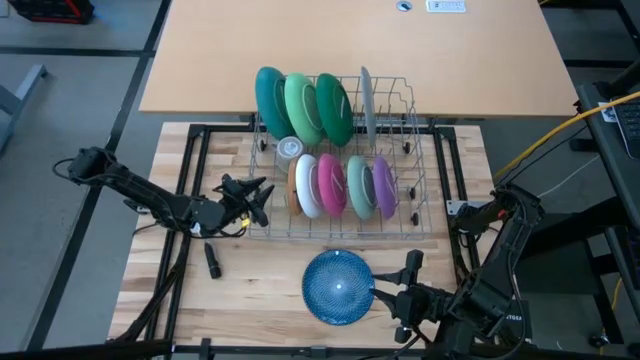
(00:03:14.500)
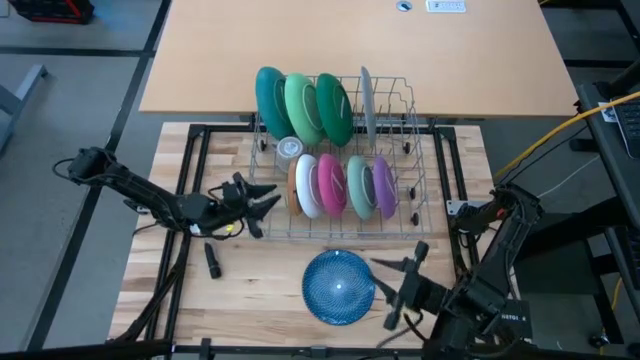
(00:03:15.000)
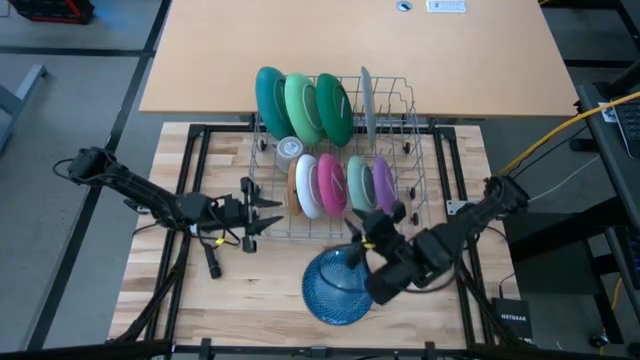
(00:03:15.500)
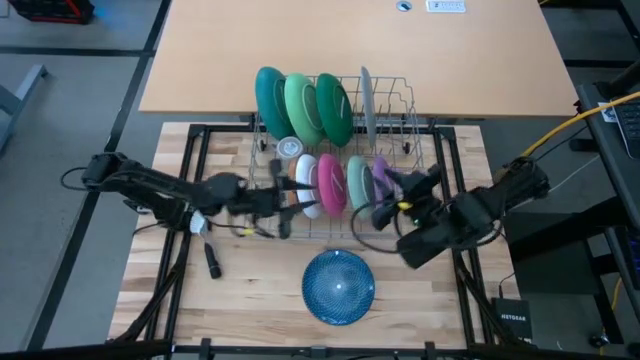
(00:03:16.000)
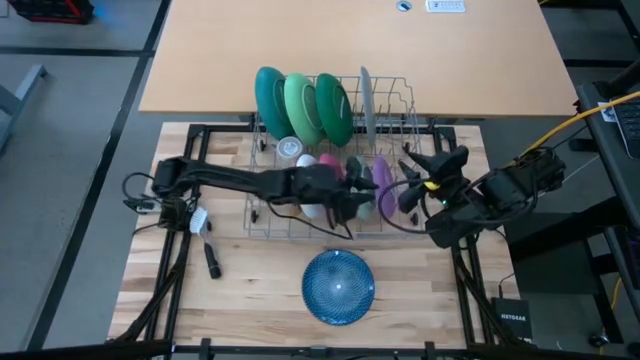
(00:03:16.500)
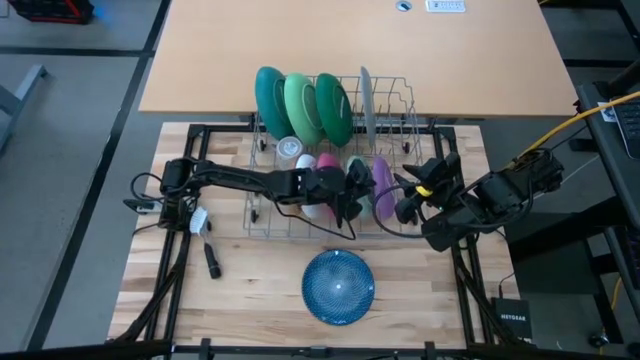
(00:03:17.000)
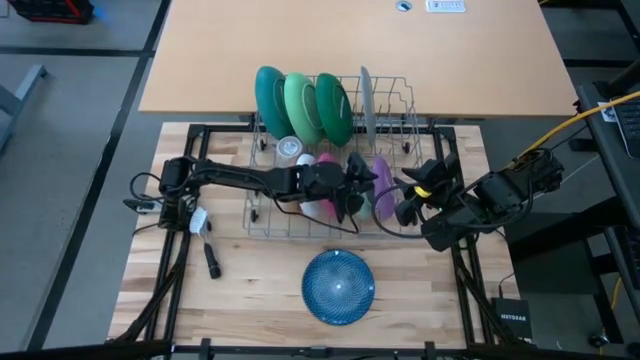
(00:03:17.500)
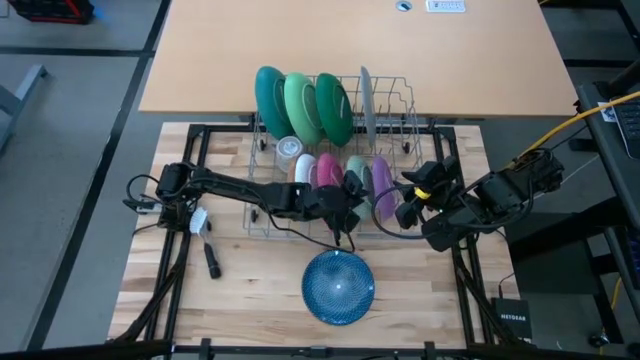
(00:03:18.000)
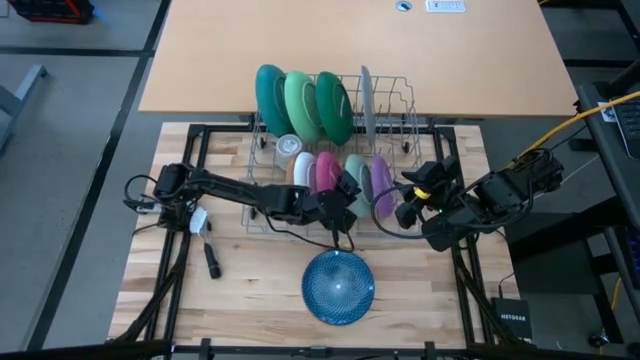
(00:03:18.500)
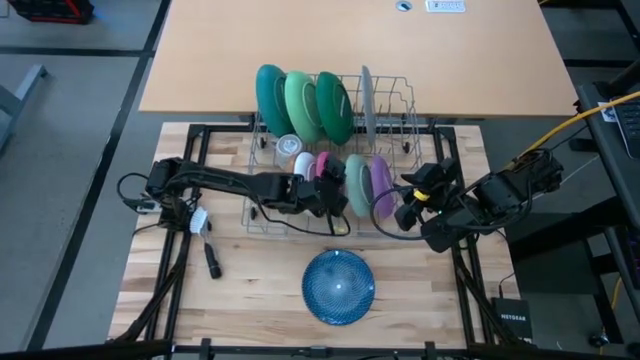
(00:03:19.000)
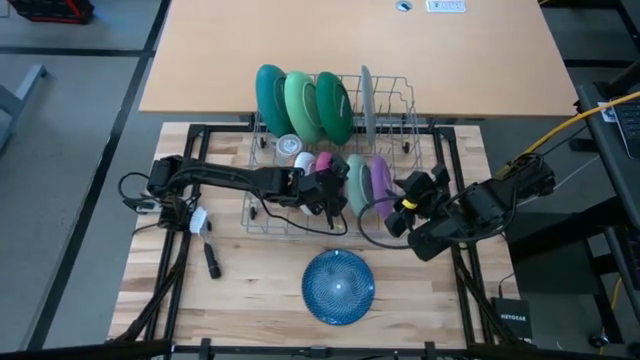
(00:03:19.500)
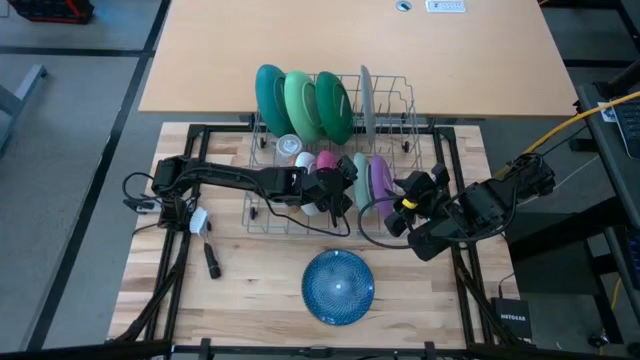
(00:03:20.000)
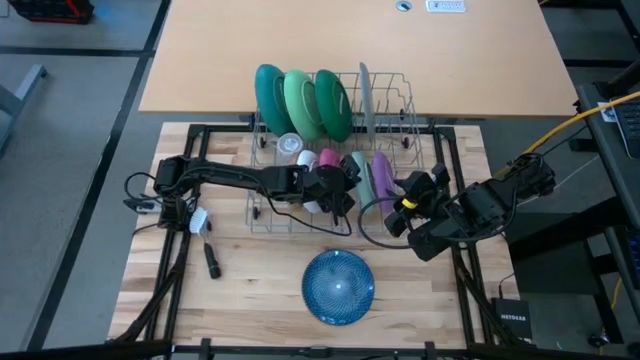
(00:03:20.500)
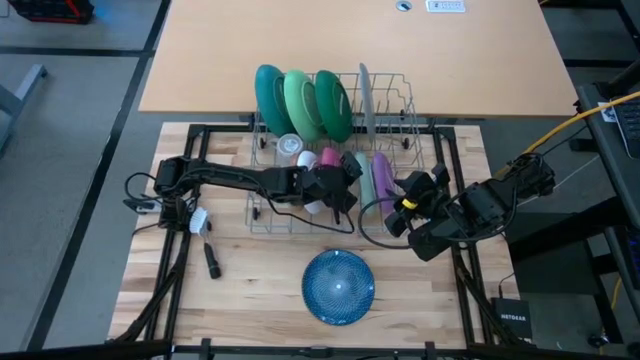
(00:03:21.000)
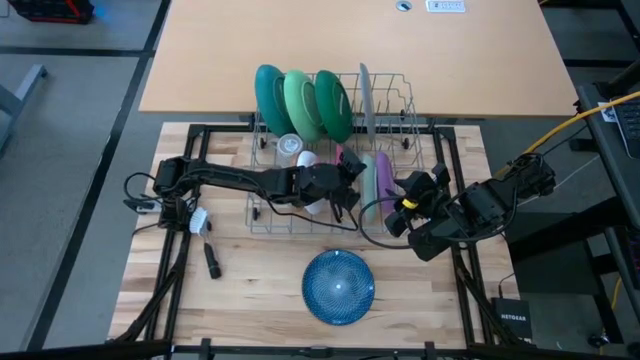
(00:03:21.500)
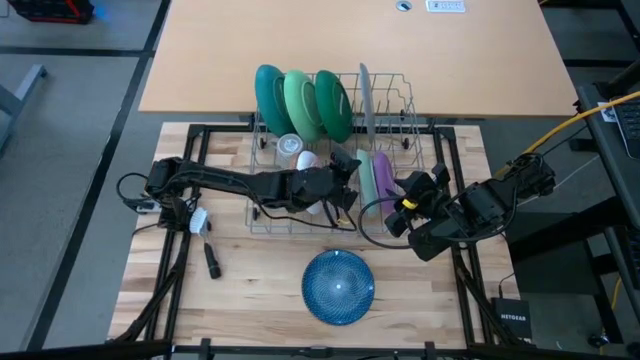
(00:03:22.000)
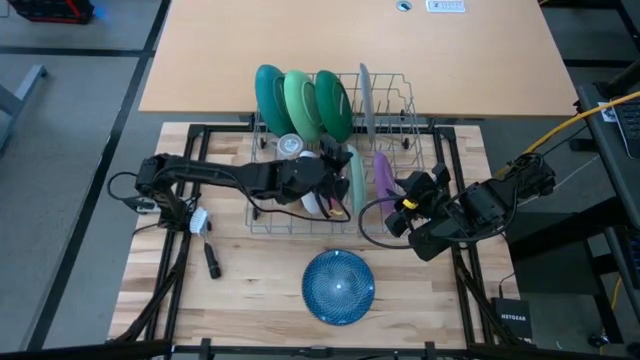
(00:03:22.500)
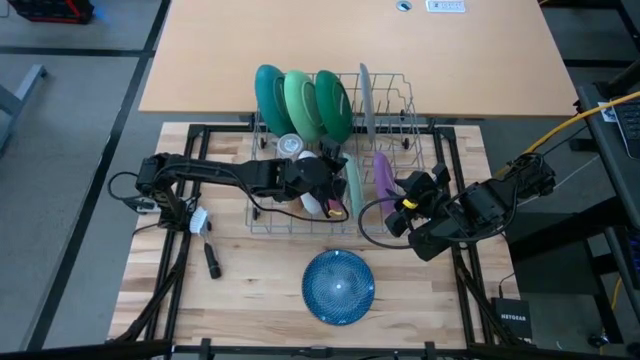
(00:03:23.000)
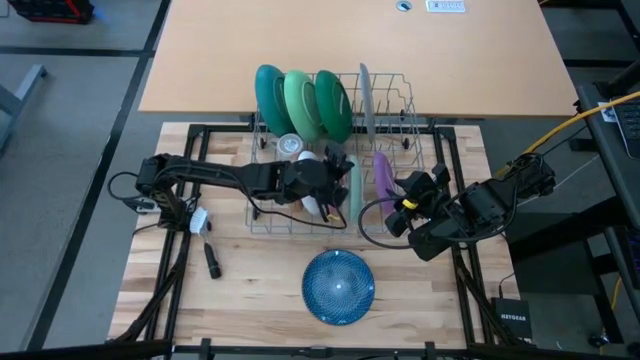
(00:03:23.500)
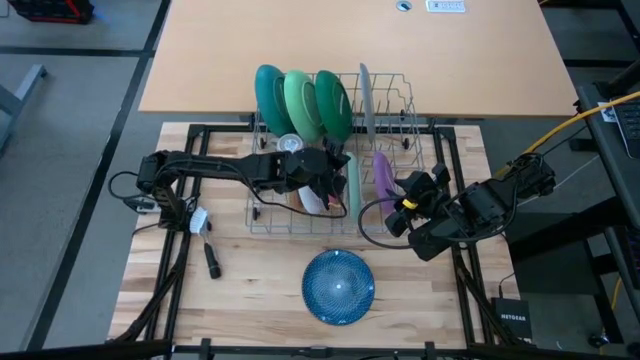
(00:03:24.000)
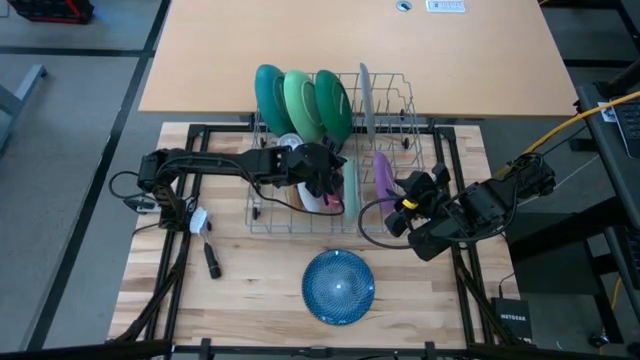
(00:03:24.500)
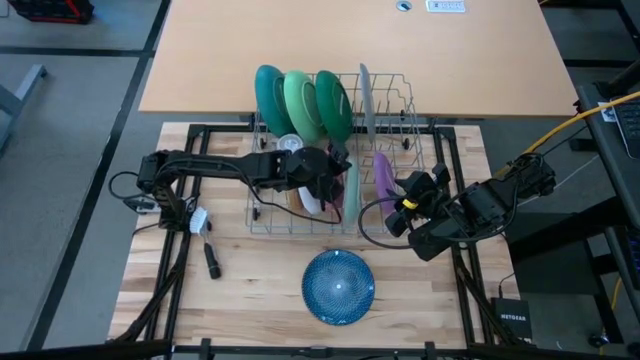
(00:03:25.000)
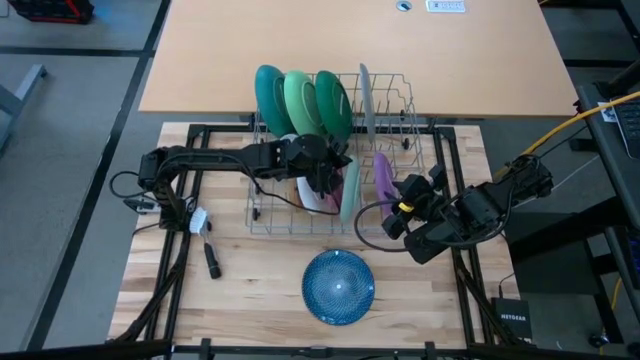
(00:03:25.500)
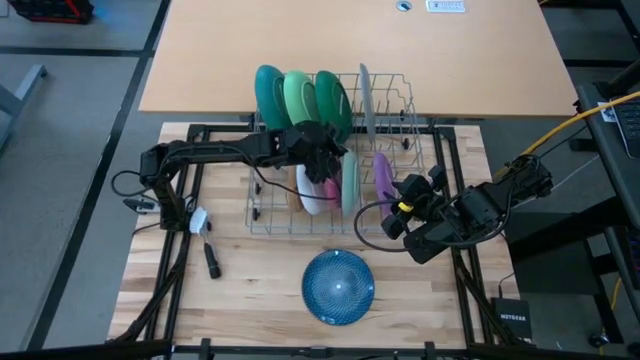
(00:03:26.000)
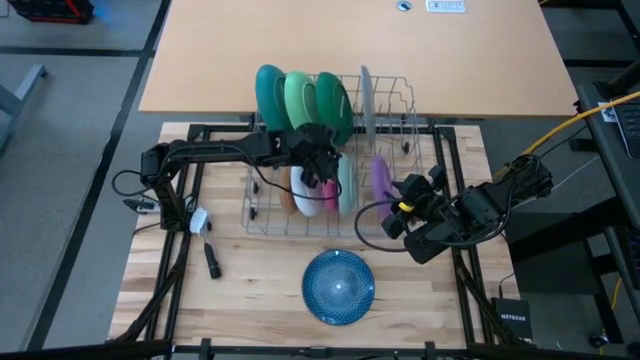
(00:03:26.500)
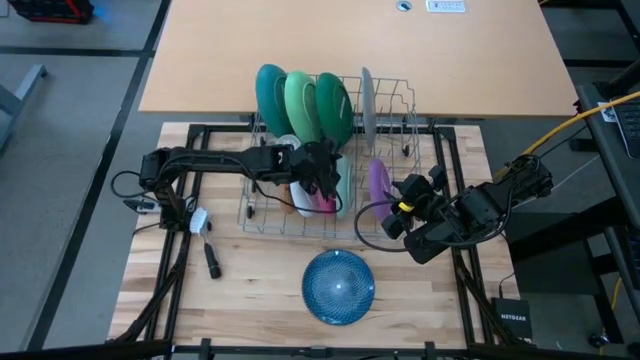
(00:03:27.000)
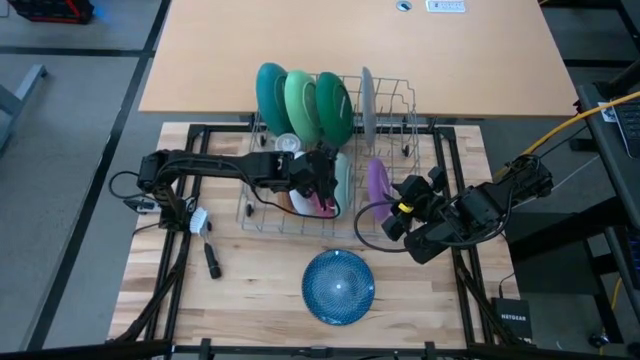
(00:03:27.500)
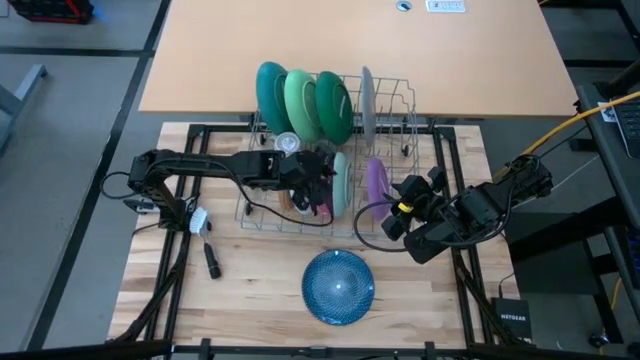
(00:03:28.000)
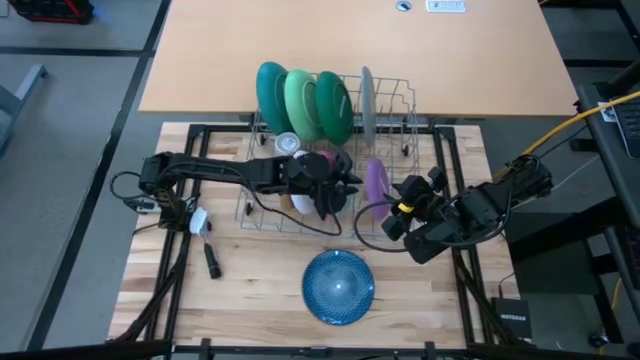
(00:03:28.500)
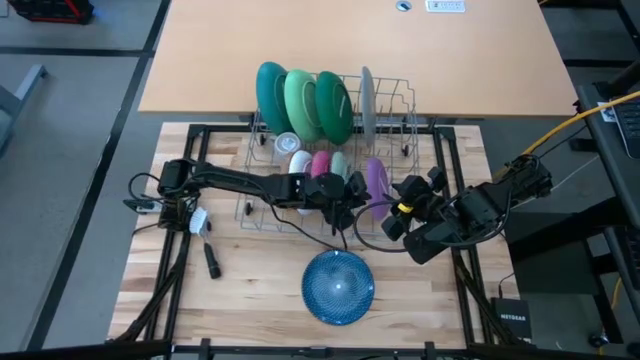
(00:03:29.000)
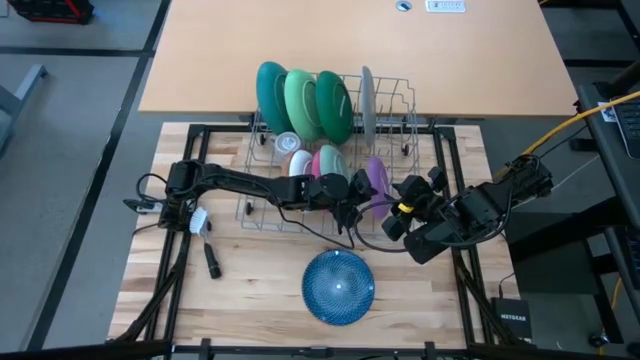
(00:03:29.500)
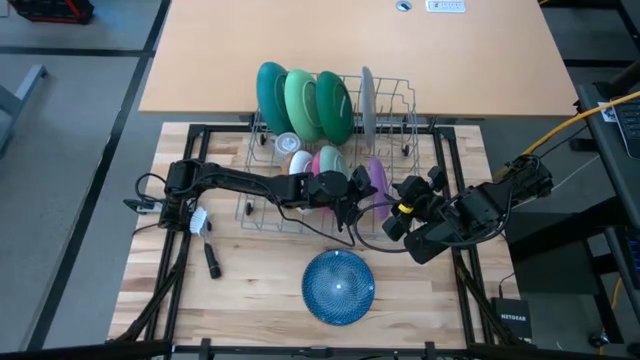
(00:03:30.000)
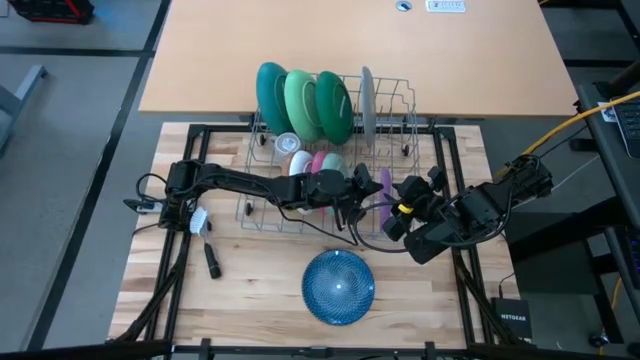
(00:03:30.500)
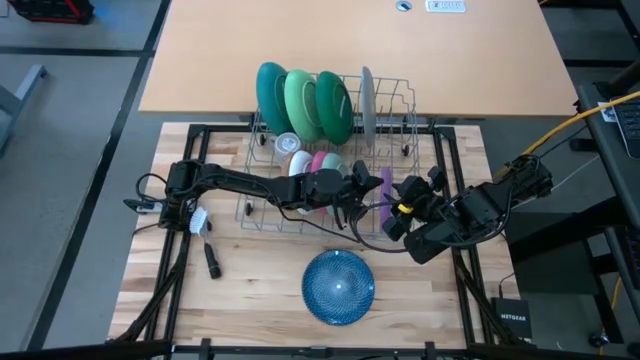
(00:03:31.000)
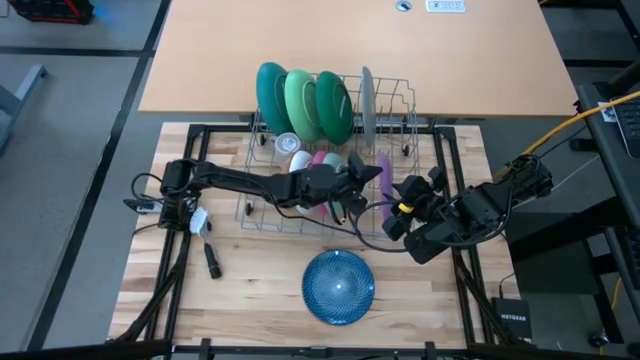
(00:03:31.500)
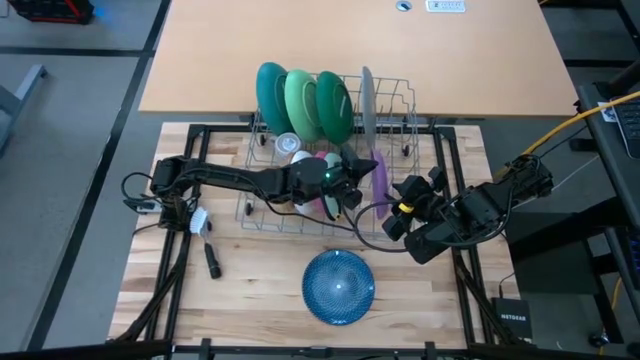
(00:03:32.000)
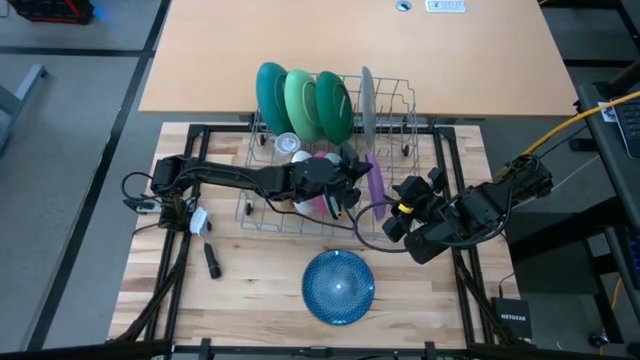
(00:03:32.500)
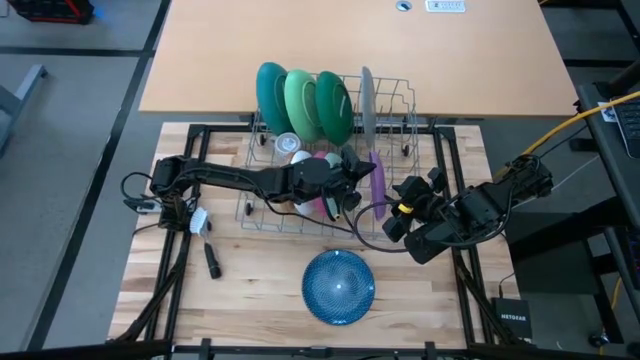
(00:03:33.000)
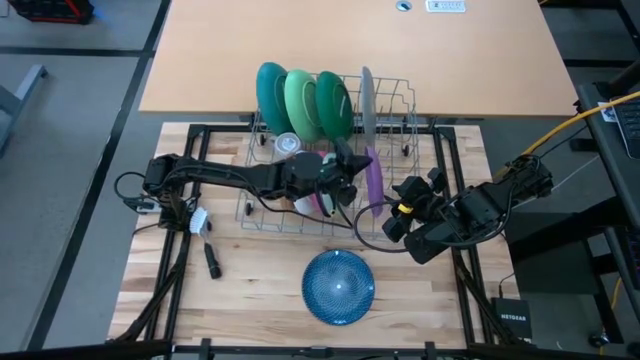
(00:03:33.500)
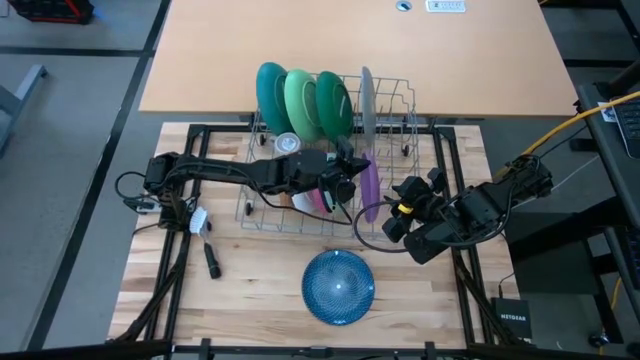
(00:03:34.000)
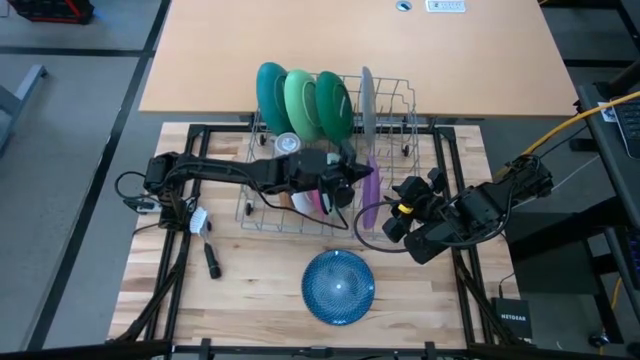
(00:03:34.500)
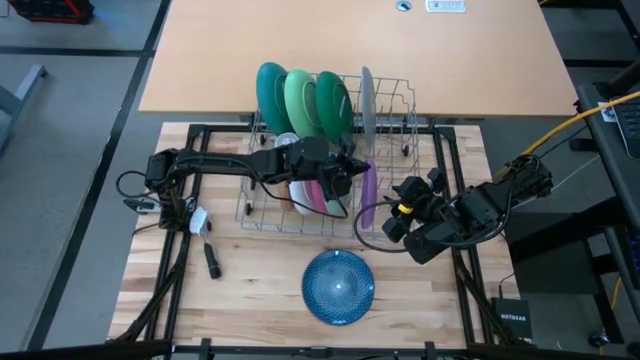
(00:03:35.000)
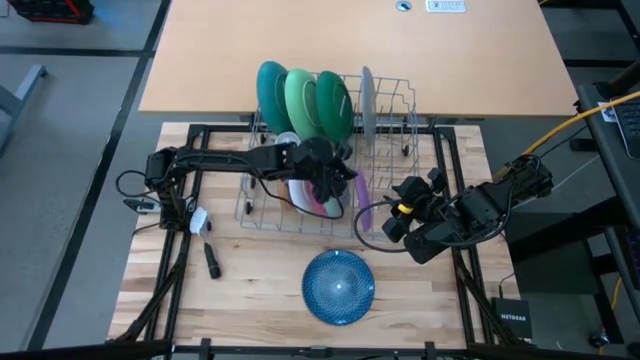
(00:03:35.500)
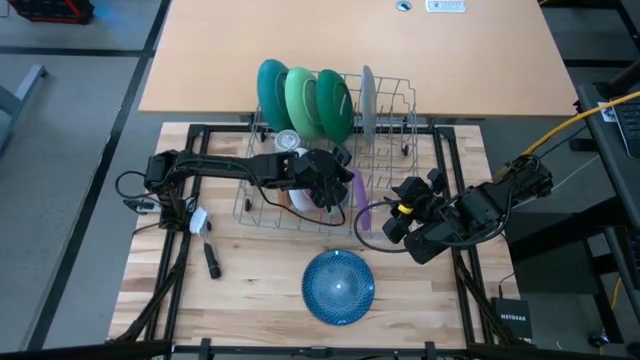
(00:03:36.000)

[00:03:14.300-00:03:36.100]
Task: Sort dishes
Adjust the plates in the dish rack
